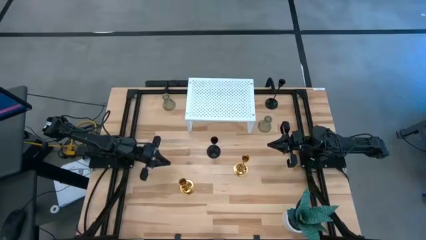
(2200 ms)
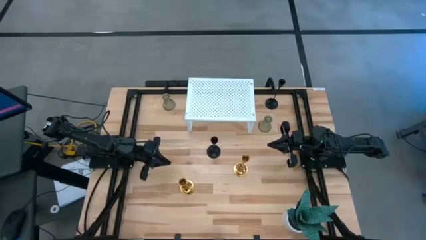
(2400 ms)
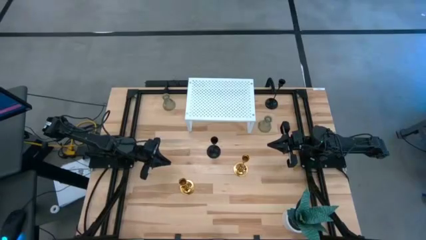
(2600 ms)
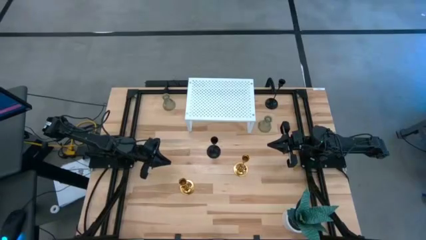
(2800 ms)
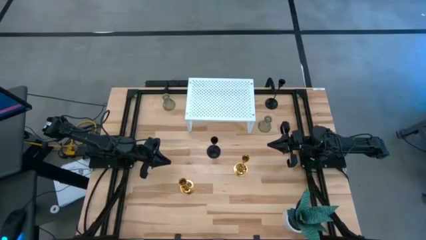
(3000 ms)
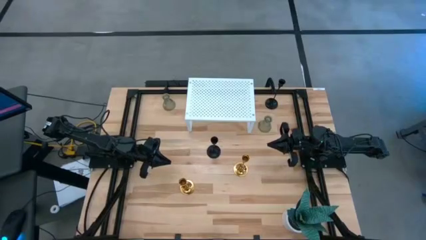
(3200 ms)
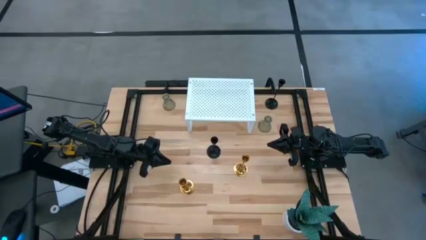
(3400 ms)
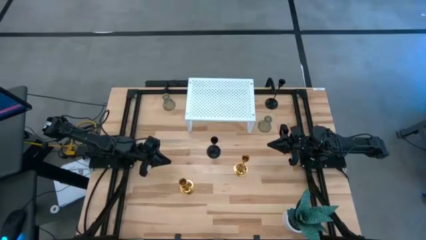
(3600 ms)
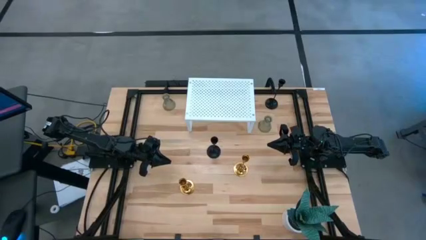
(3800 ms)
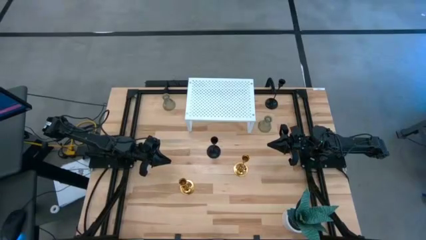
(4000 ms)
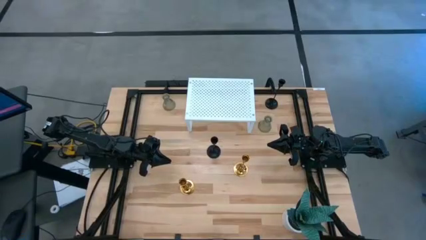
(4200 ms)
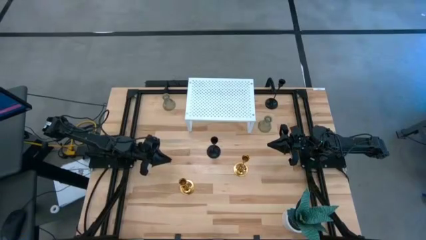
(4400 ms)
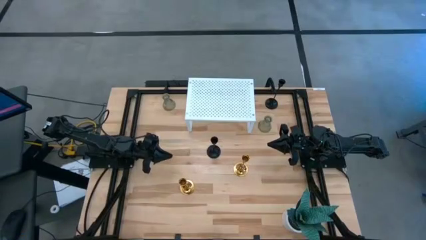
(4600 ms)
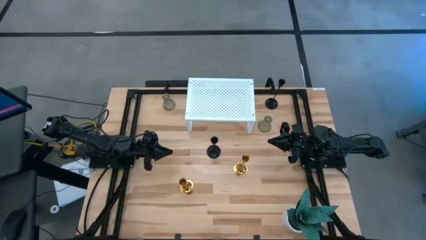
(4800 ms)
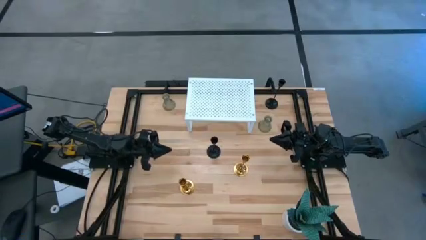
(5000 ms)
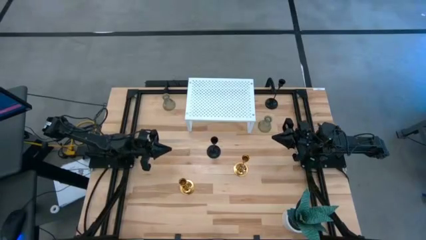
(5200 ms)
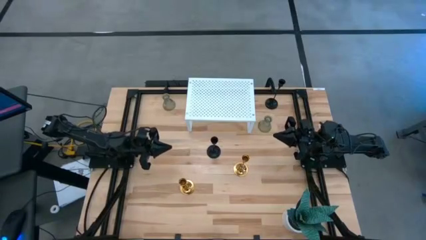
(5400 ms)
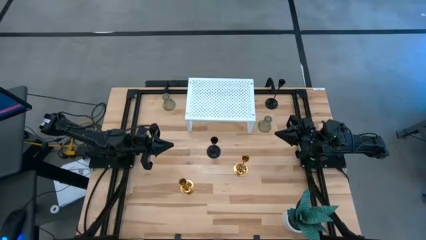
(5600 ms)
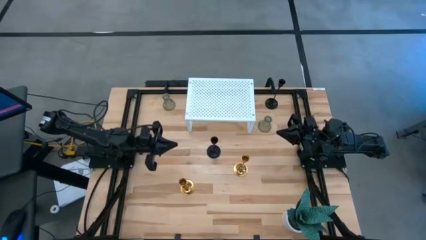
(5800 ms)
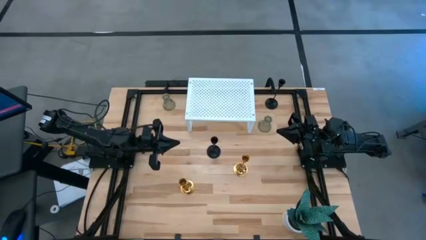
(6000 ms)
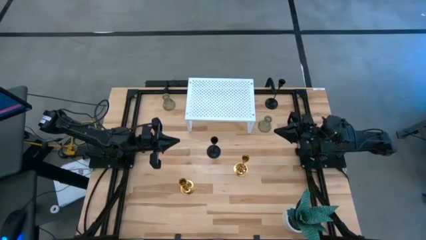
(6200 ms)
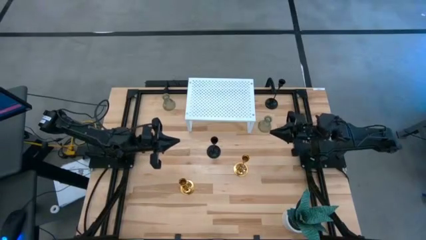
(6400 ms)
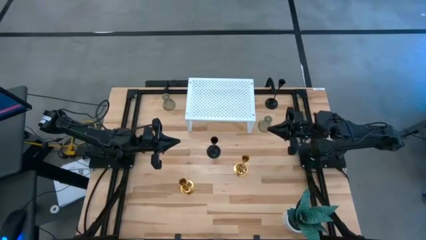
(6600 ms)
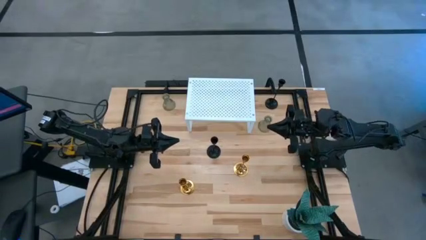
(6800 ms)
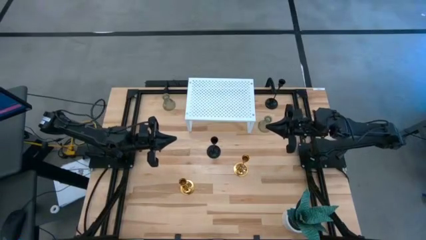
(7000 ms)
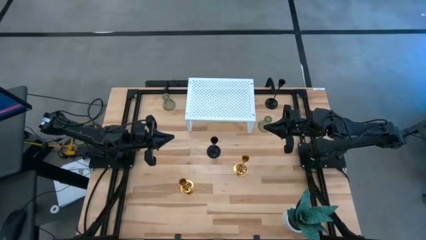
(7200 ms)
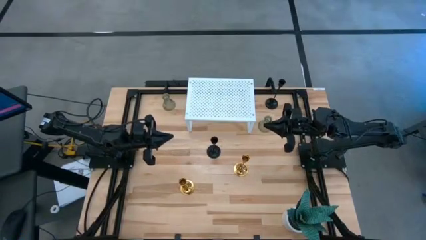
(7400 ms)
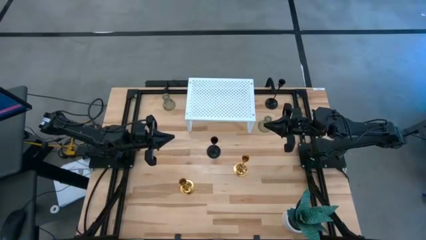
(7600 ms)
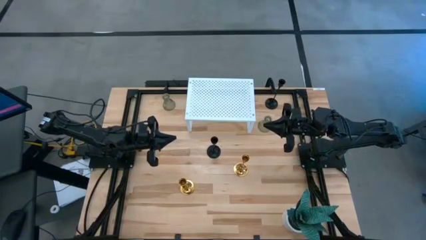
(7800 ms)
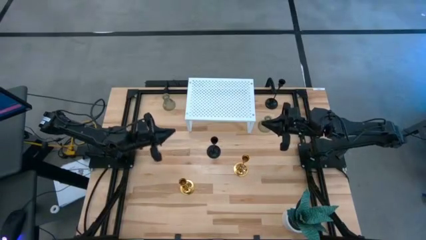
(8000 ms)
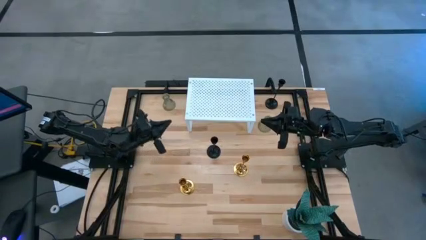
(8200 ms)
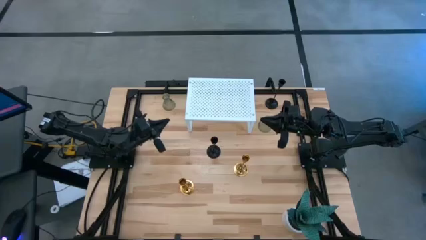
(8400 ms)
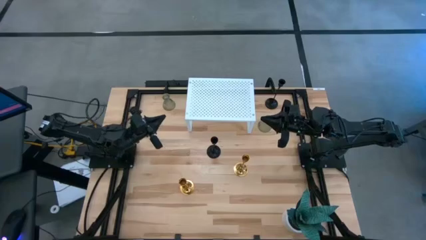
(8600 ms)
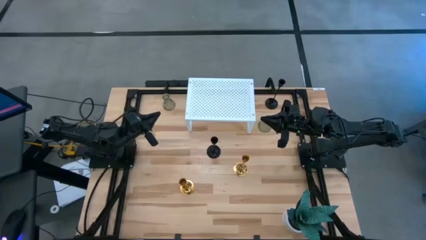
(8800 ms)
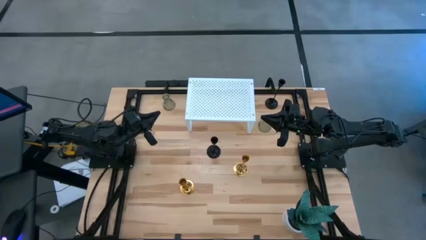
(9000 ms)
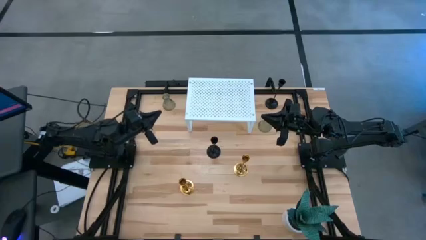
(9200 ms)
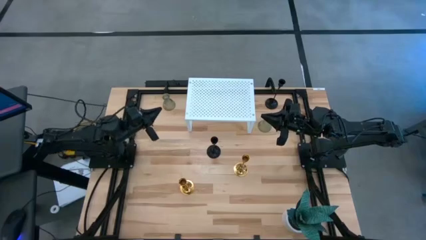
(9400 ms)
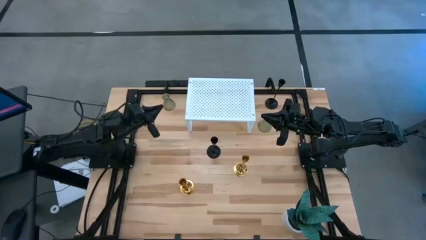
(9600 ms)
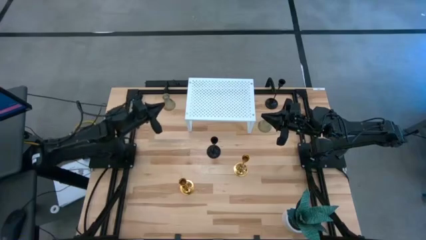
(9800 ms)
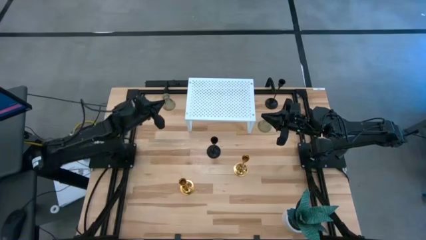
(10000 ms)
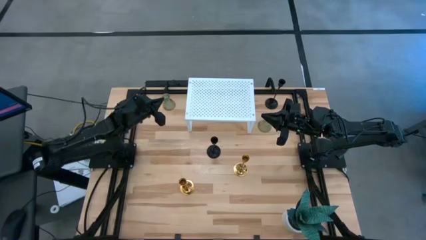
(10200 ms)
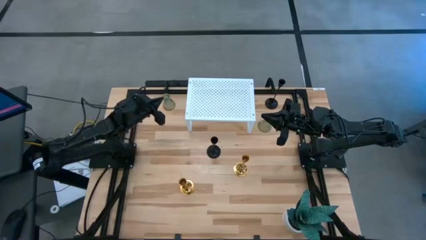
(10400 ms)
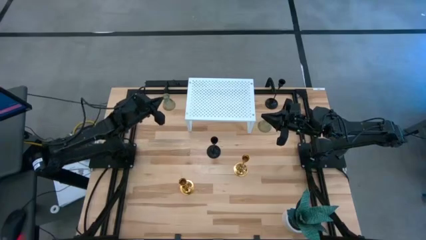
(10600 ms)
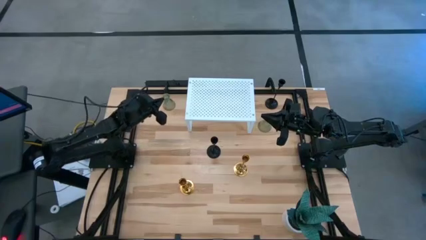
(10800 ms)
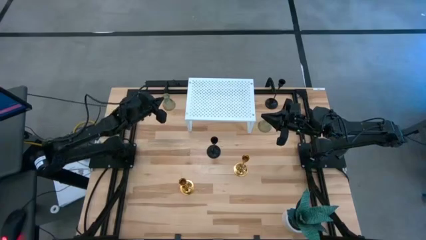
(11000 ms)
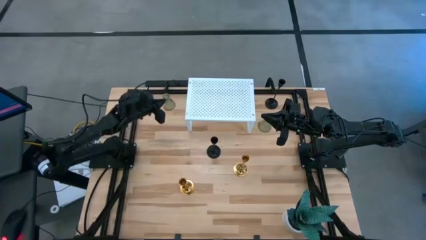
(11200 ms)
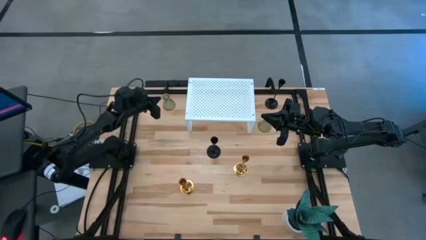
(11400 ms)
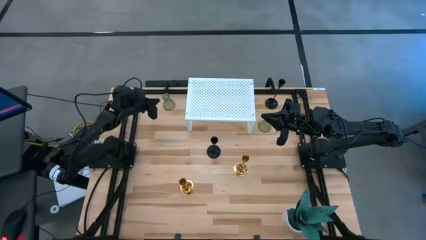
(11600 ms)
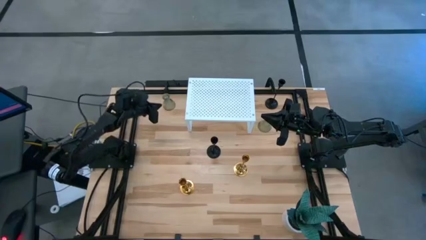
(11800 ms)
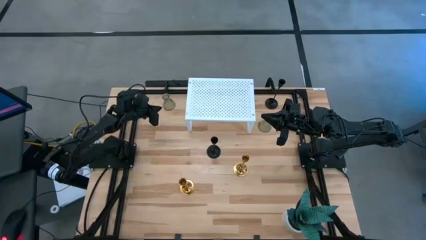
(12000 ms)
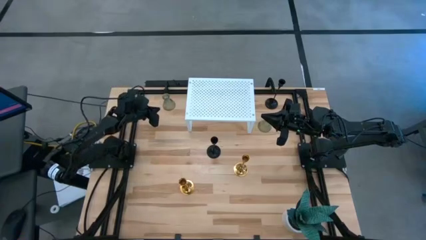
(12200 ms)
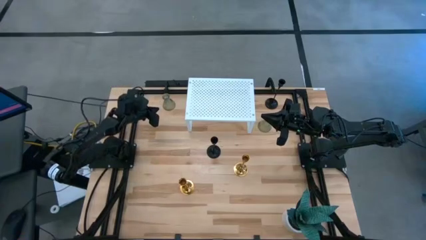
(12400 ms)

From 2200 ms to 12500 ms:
Task: Pick & Place candle stick holders
Put the top transparent candle holder on the shelf
